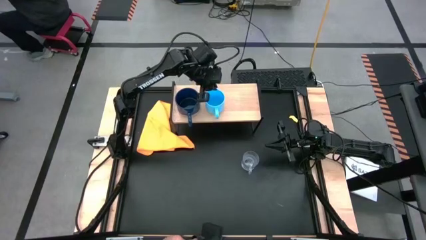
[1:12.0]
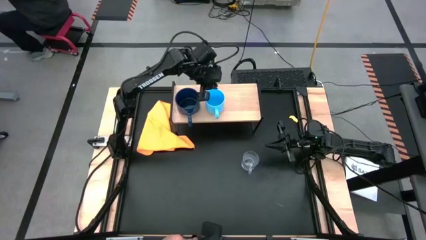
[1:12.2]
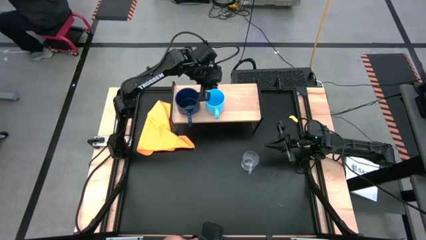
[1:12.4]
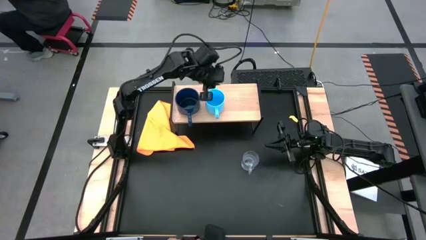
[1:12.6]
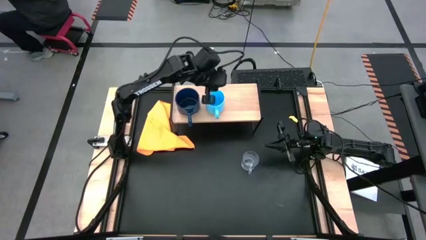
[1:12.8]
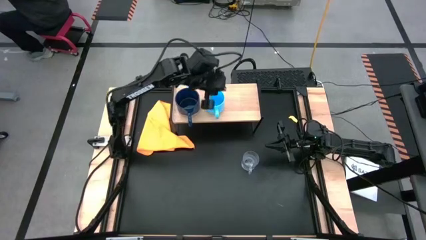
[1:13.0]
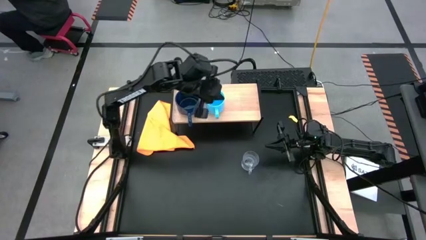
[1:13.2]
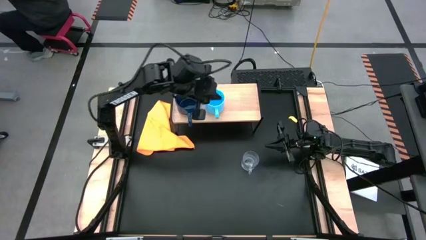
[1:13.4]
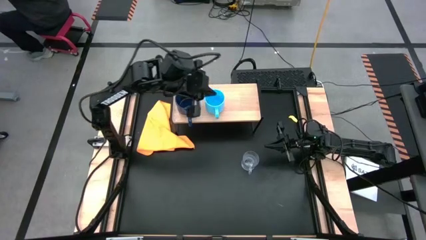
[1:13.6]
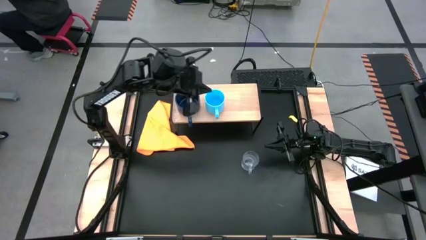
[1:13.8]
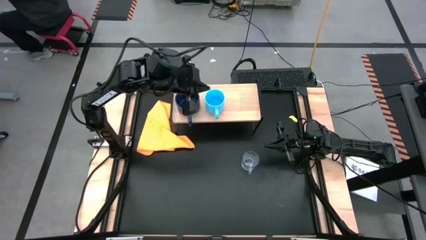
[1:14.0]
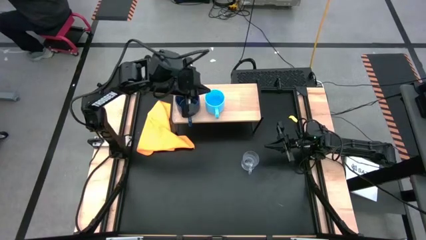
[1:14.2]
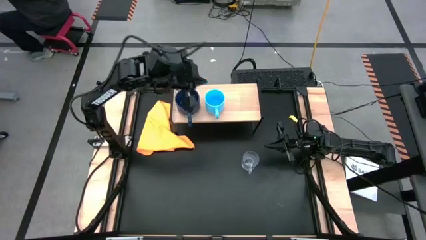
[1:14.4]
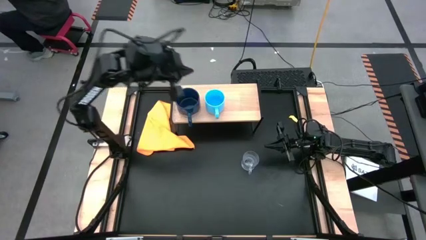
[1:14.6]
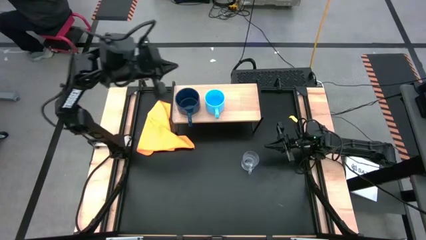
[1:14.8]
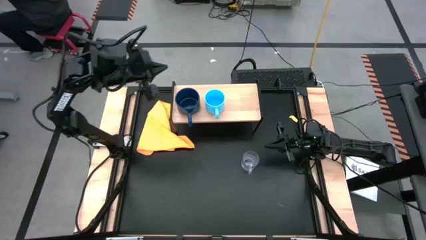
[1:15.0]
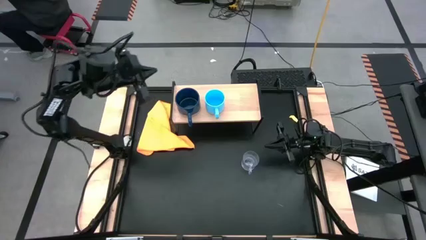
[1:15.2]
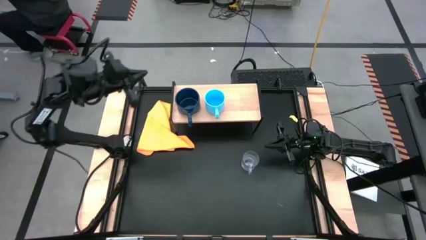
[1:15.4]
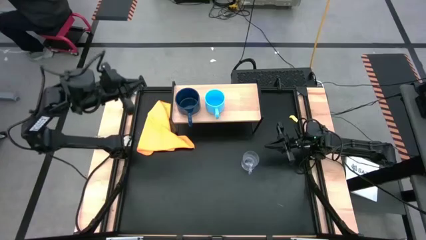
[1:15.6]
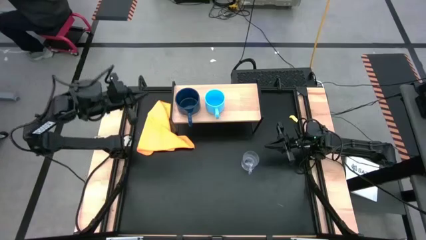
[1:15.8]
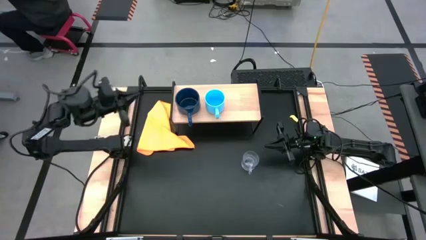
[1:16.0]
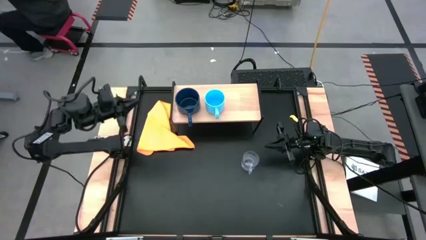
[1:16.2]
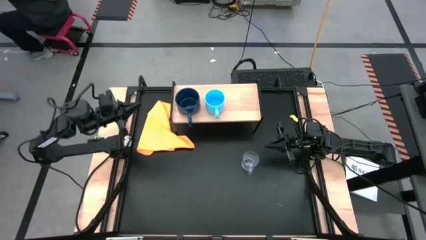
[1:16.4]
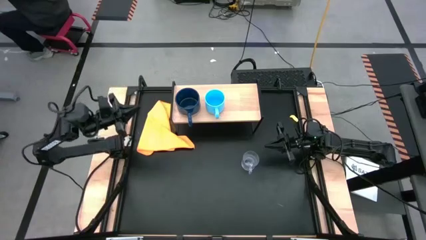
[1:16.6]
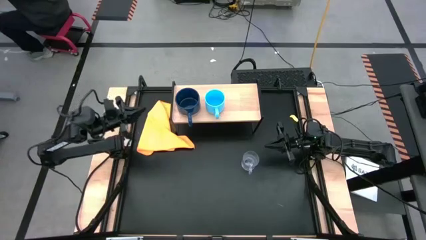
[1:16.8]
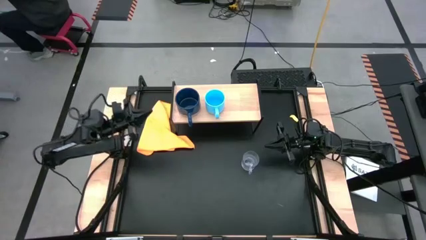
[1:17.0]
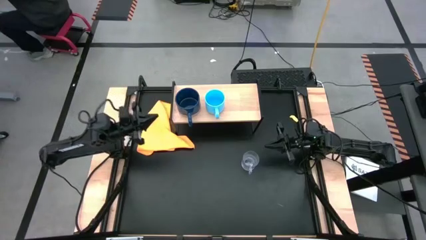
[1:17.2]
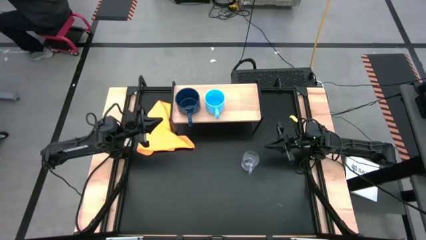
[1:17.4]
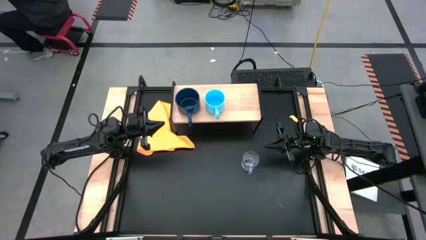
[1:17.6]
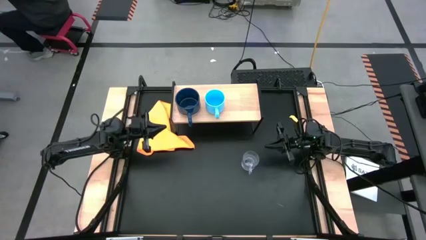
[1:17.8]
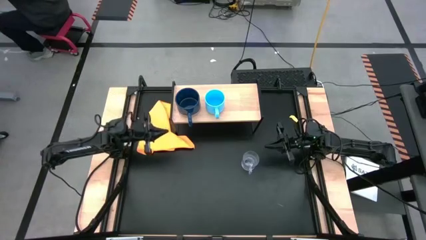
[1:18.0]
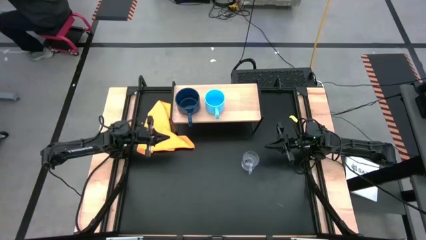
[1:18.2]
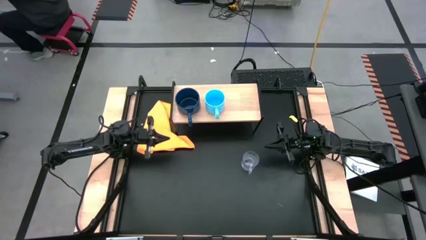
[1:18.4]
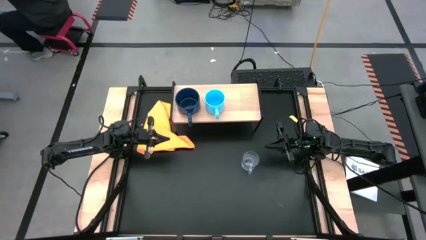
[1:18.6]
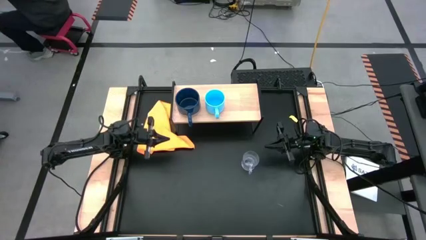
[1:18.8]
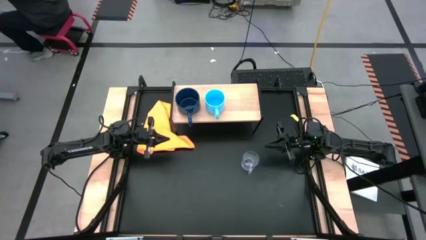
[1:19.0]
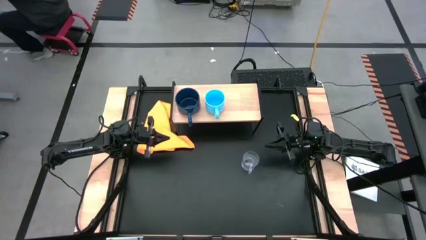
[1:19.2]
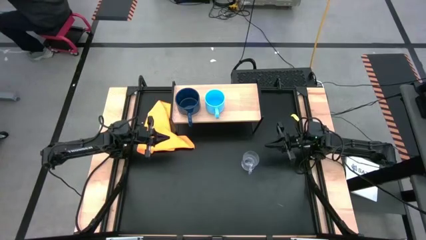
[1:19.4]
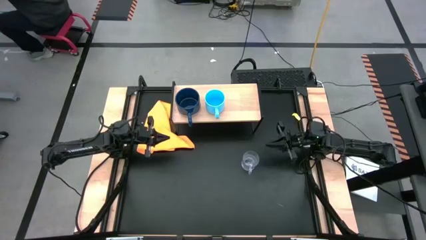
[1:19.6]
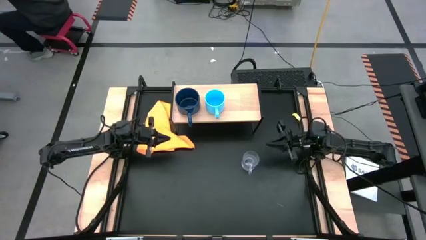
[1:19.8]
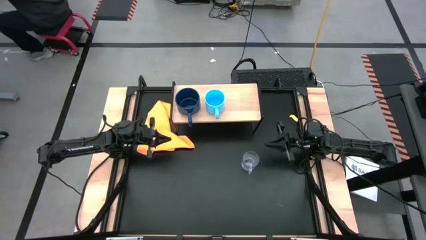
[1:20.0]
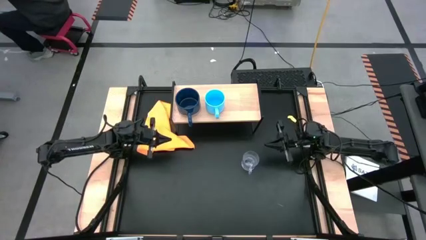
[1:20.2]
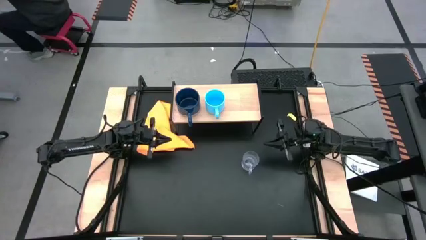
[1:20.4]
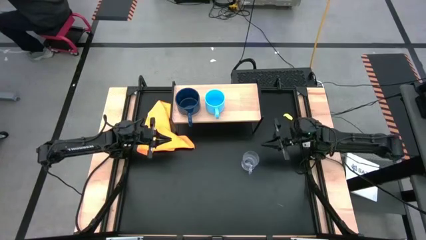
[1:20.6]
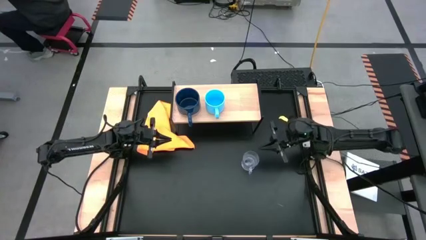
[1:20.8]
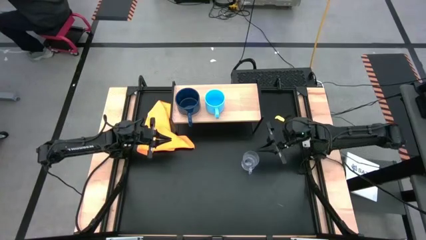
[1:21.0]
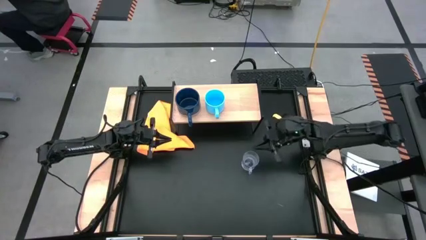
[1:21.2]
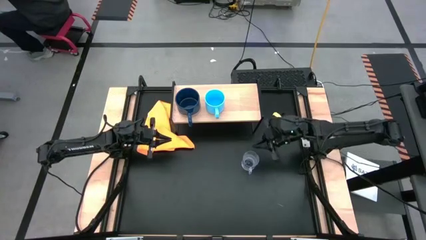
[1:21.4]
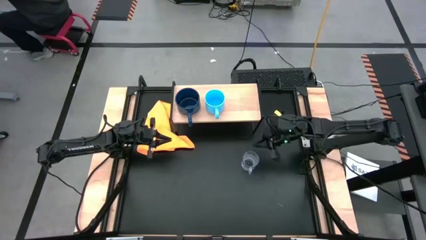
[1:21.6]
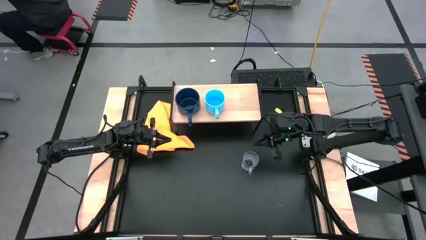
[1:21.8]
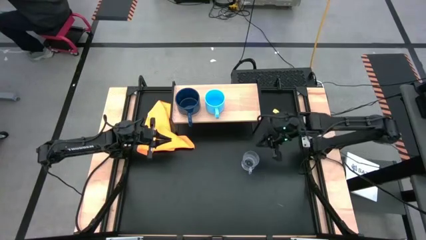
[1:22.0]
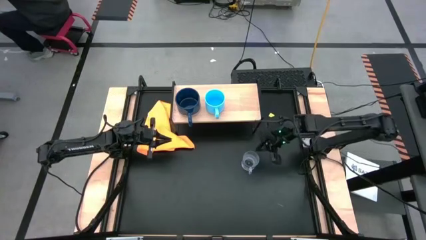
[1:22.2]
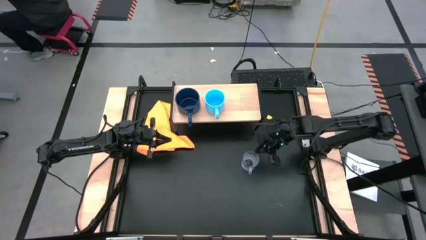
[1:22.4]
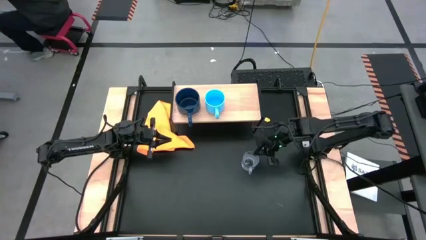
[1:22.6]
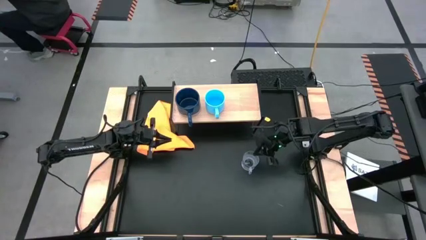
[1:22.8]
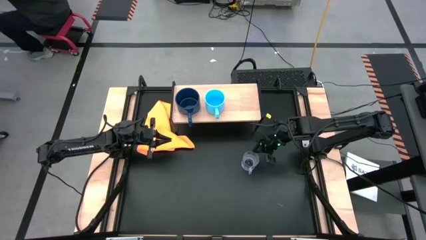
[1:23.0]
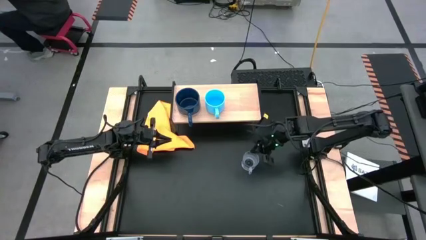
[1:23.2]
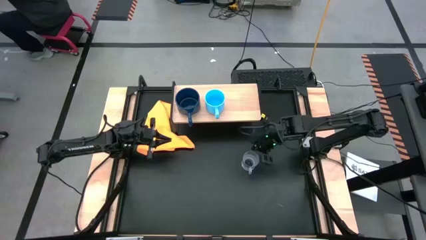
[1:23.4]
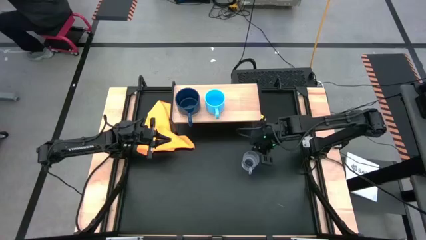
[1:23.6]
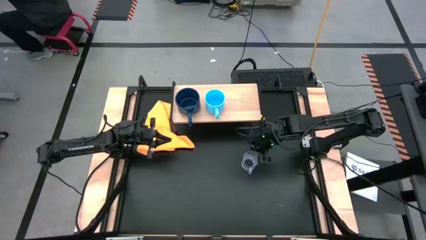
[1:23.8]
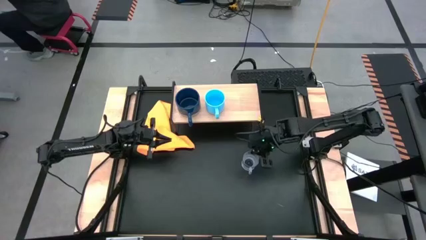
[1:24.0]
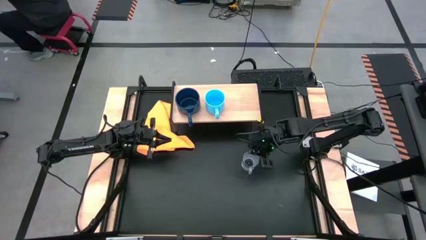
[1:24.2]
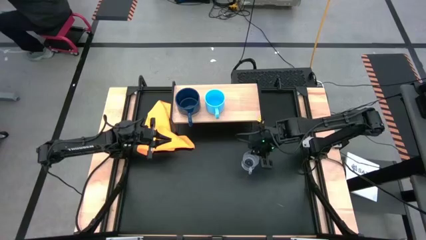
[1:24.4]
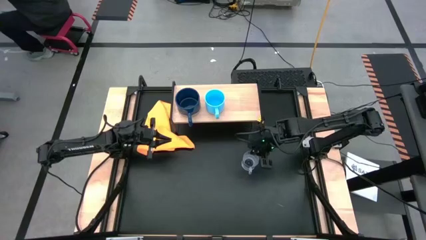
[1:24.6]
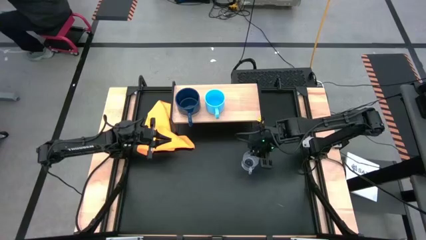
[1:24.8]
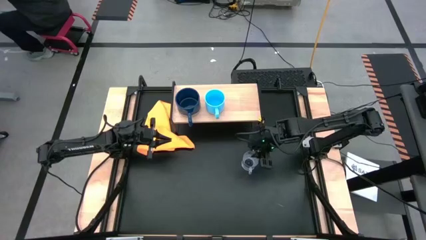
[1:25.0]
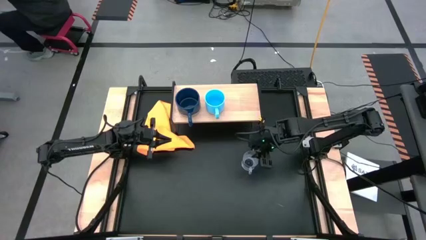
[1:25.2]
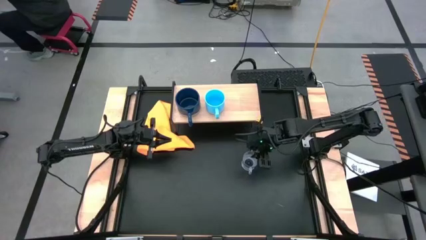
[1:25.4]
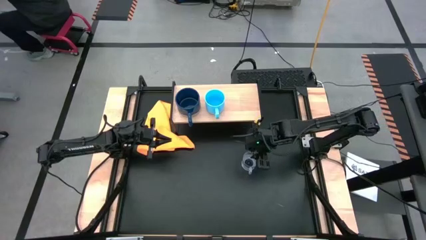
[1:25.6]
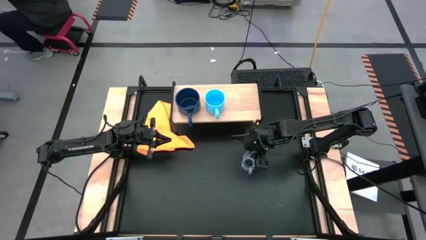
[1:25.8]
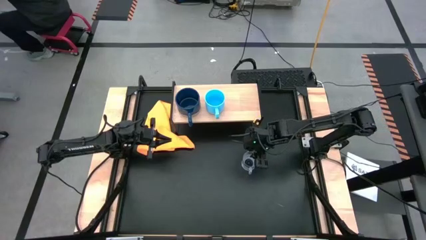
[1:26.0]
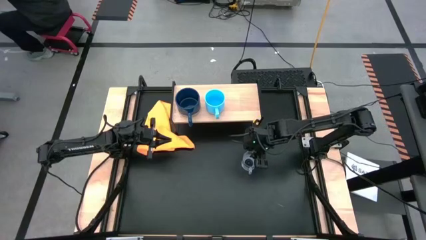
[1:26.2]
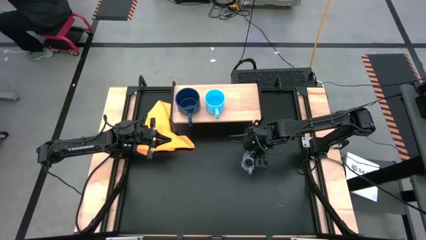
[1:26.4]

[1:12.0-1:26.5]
Task: Stack small to large cups/mugs on shelf
Put the transparent mug on the shelf
